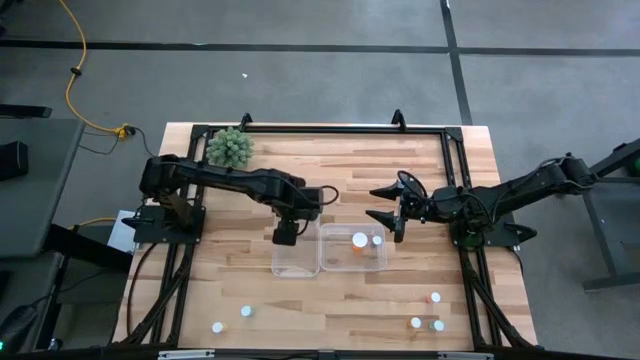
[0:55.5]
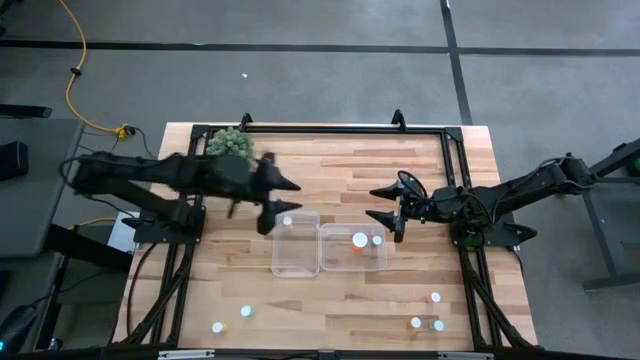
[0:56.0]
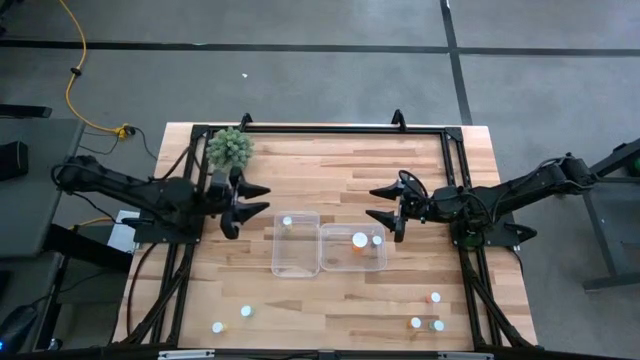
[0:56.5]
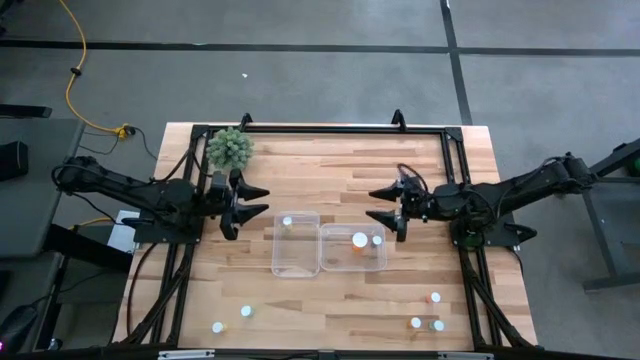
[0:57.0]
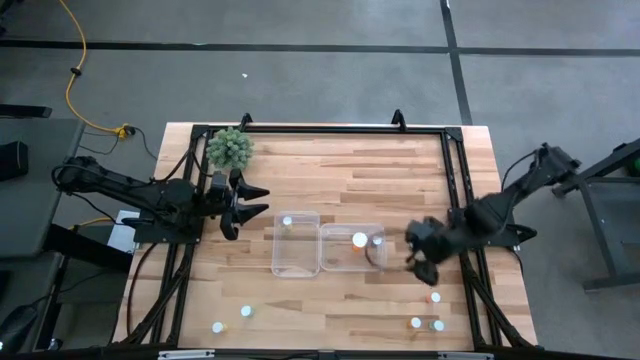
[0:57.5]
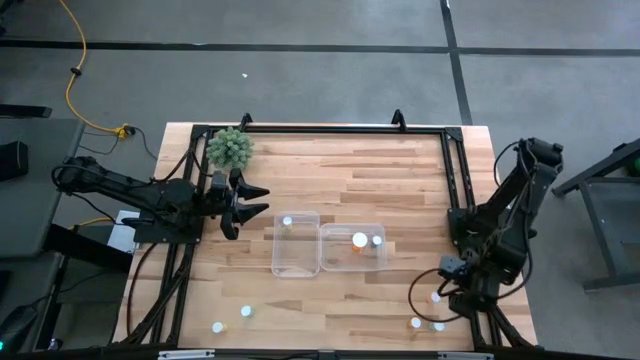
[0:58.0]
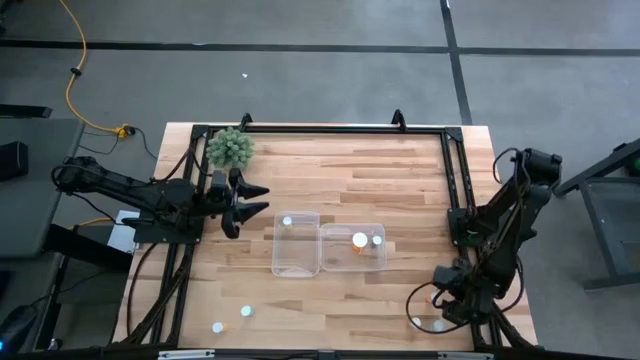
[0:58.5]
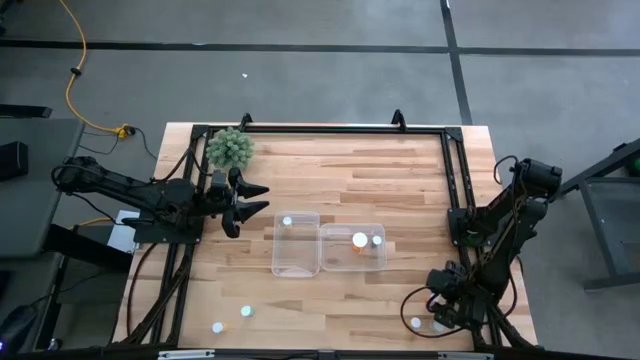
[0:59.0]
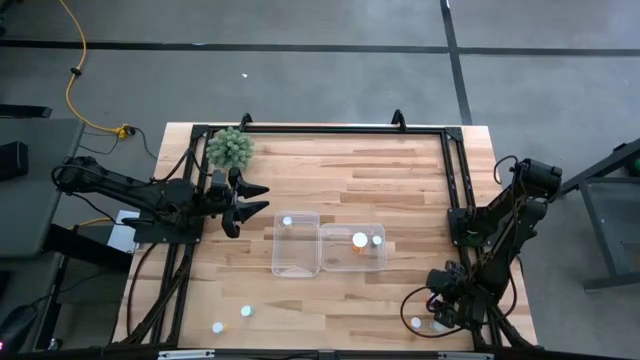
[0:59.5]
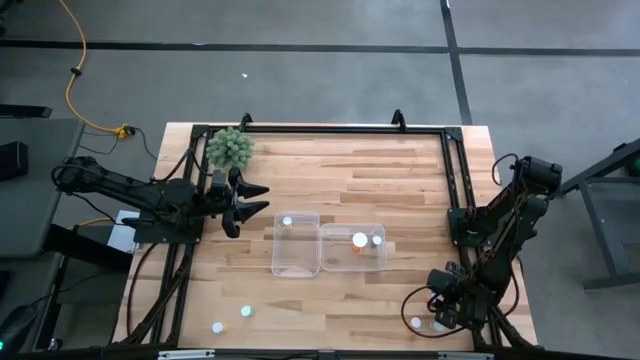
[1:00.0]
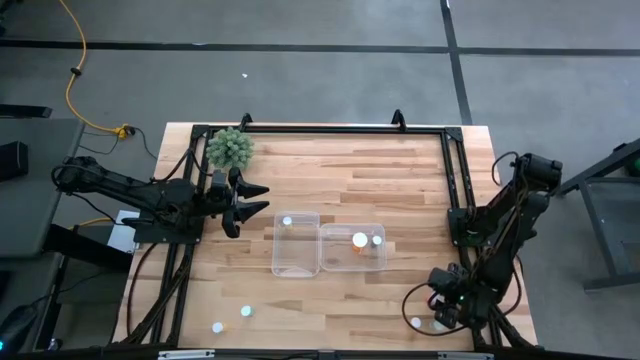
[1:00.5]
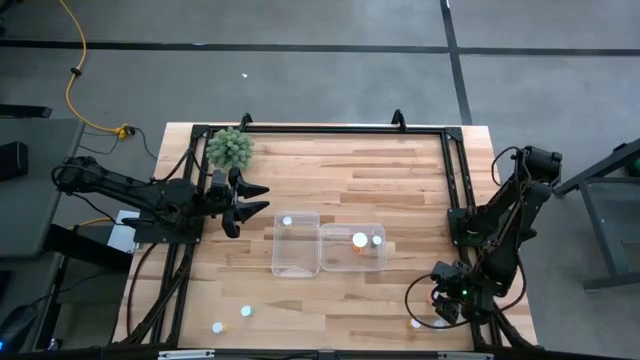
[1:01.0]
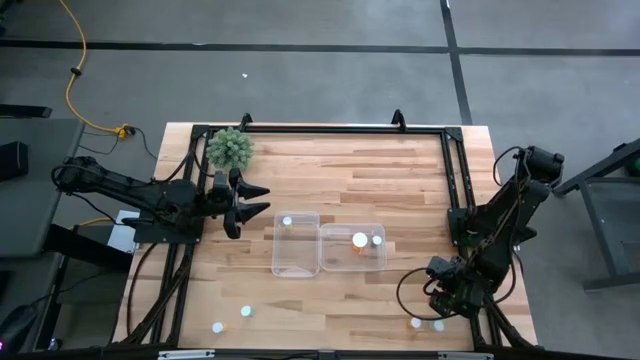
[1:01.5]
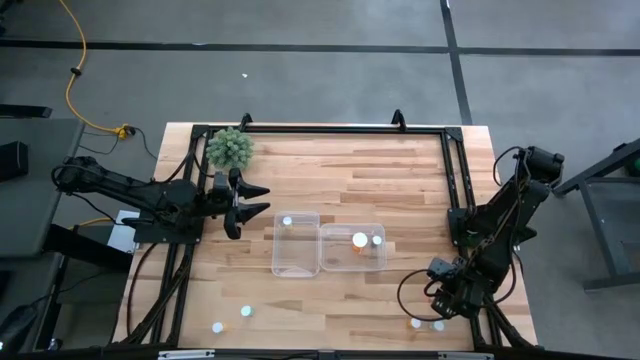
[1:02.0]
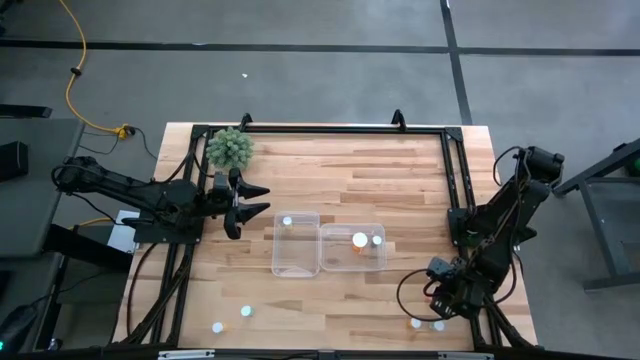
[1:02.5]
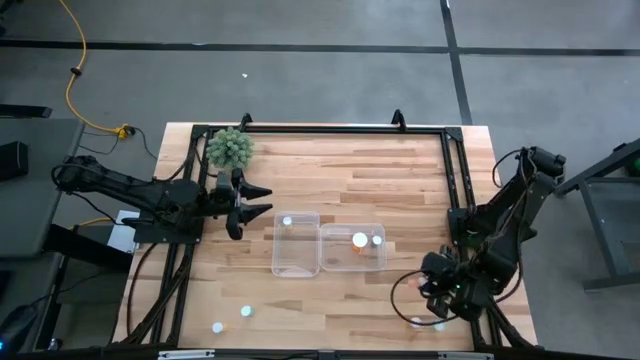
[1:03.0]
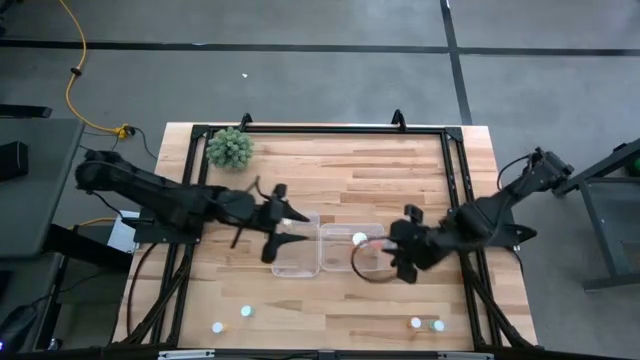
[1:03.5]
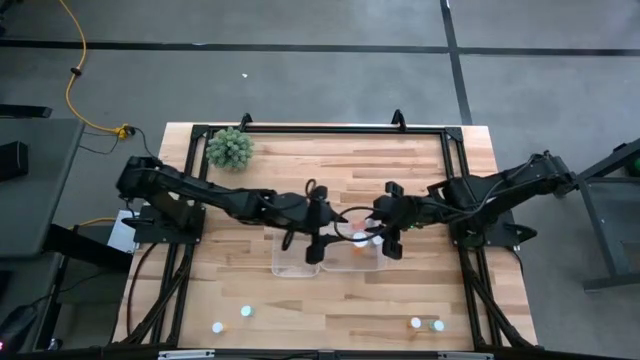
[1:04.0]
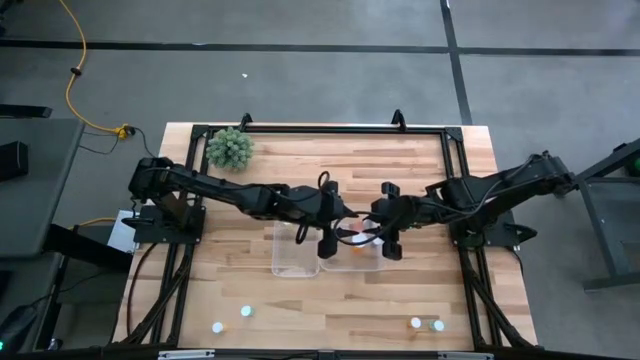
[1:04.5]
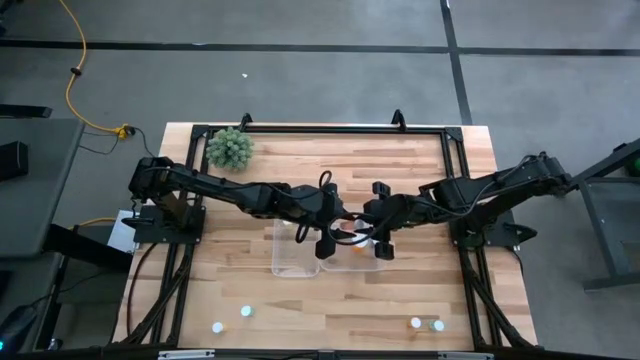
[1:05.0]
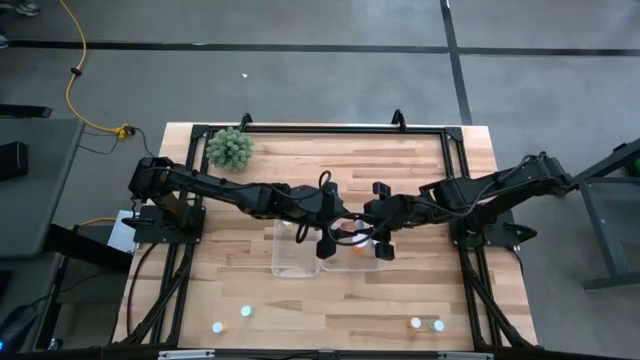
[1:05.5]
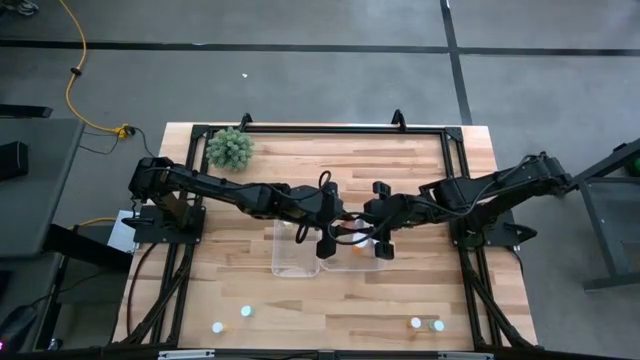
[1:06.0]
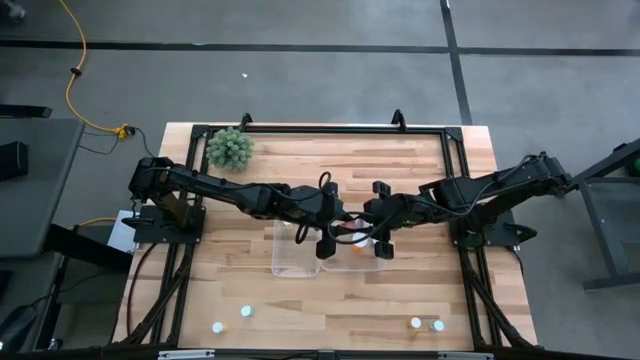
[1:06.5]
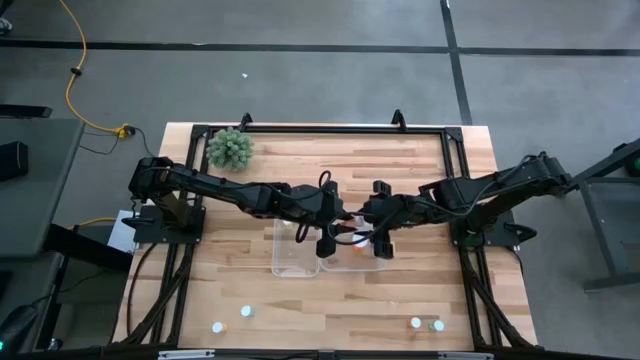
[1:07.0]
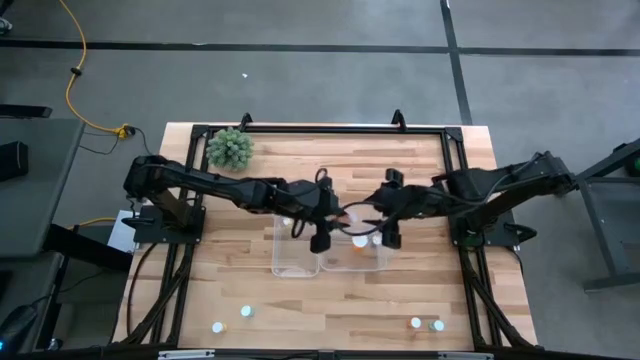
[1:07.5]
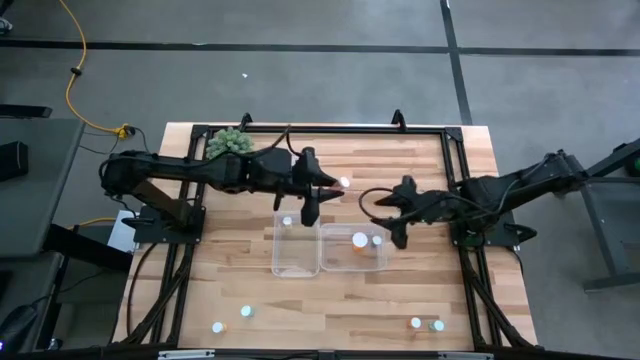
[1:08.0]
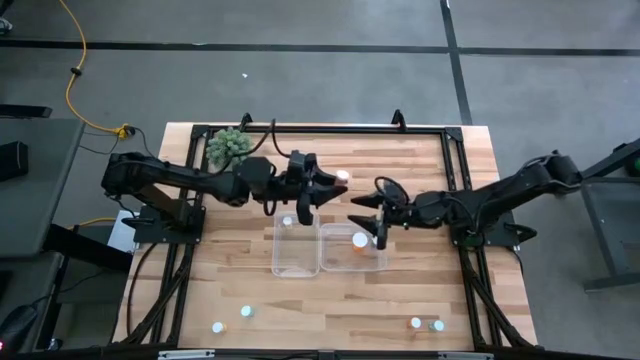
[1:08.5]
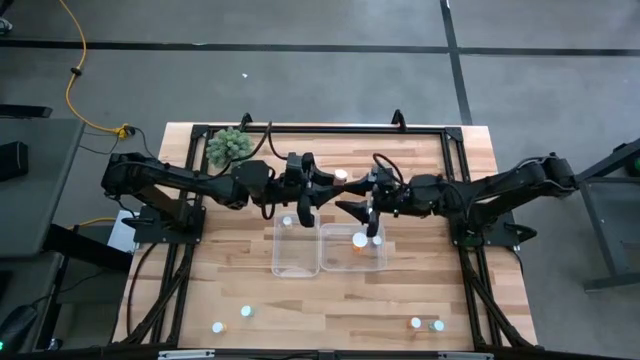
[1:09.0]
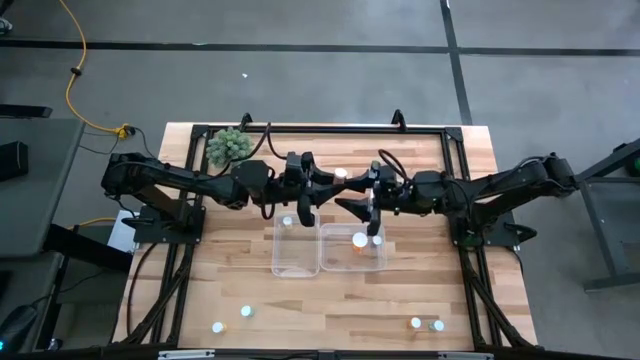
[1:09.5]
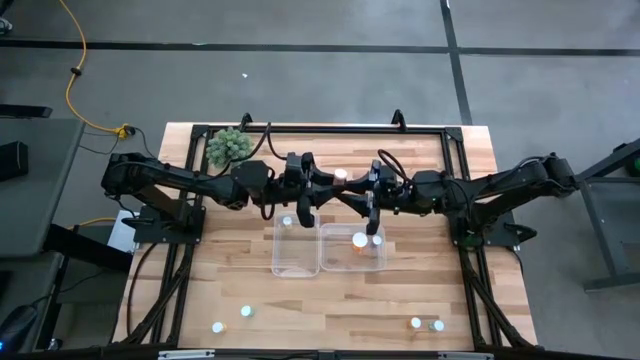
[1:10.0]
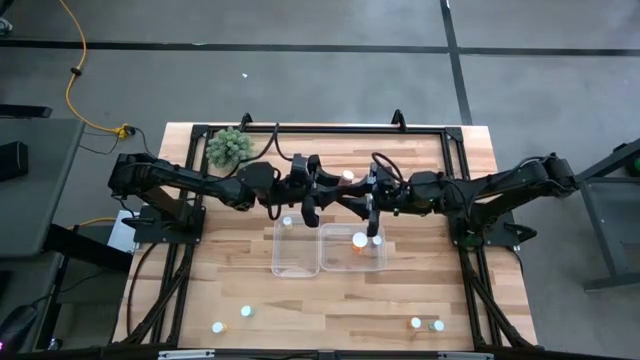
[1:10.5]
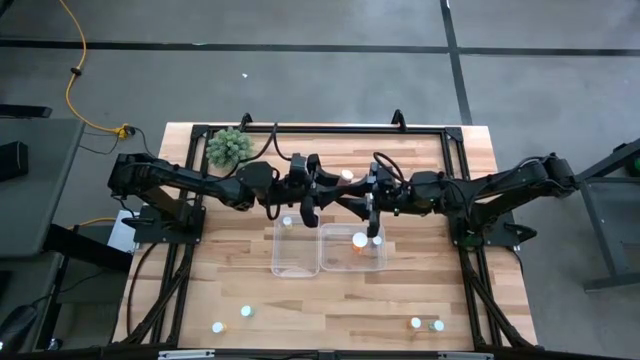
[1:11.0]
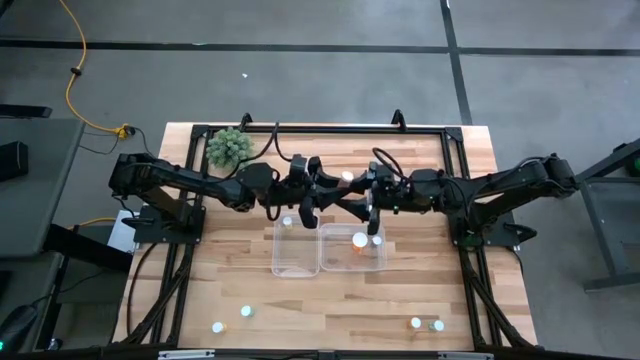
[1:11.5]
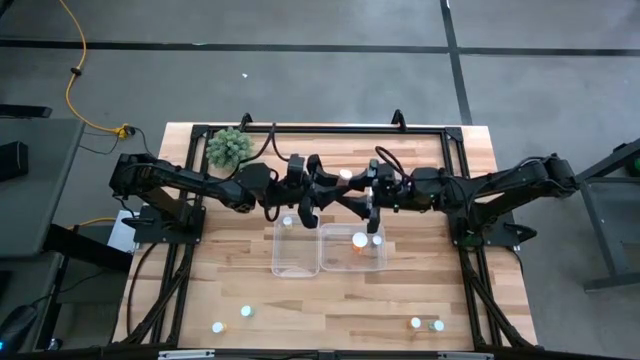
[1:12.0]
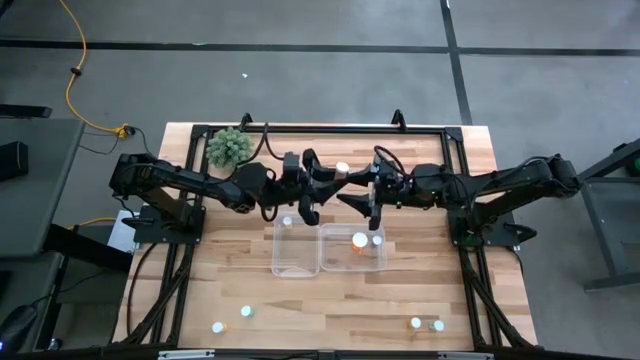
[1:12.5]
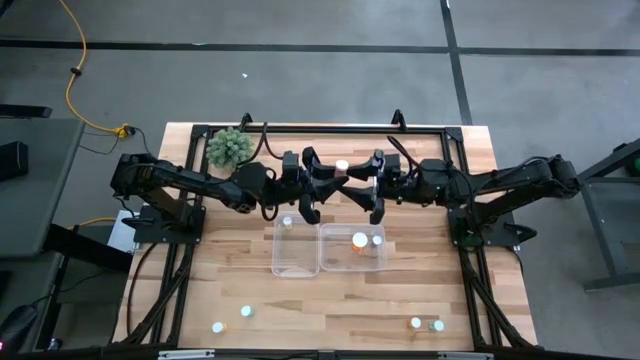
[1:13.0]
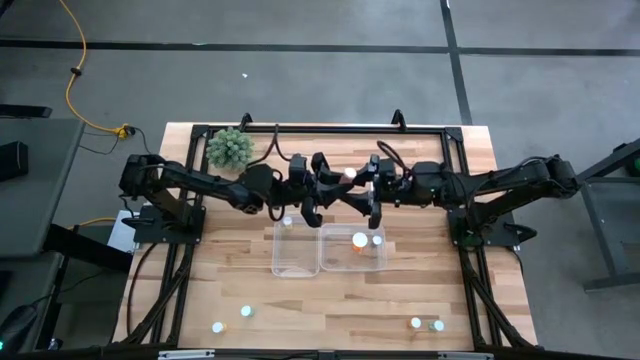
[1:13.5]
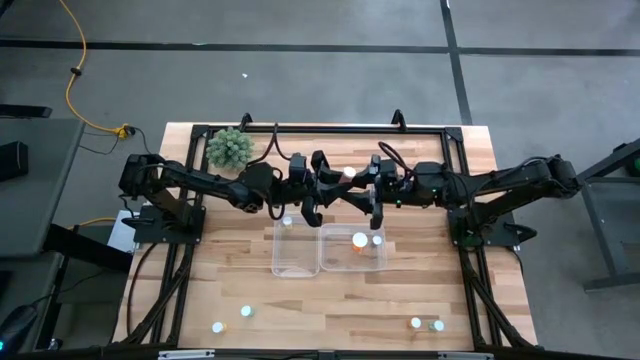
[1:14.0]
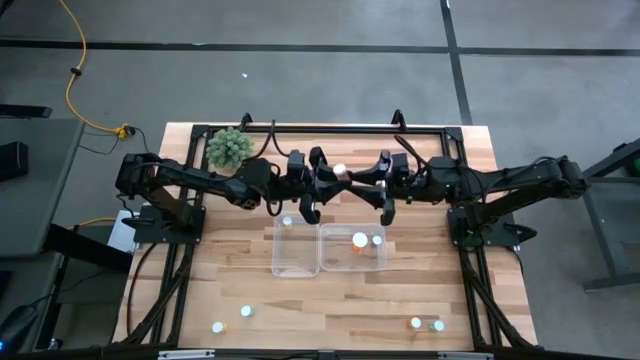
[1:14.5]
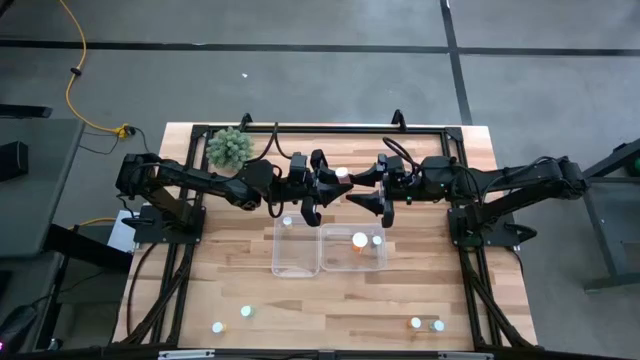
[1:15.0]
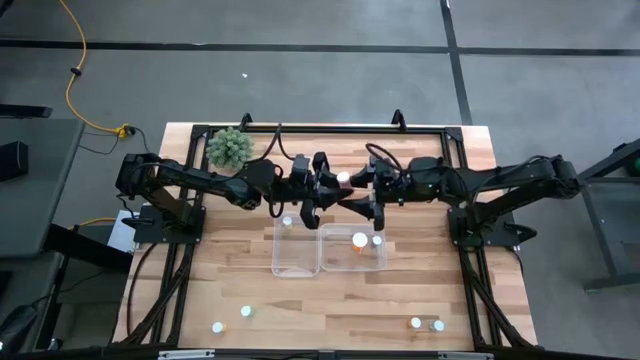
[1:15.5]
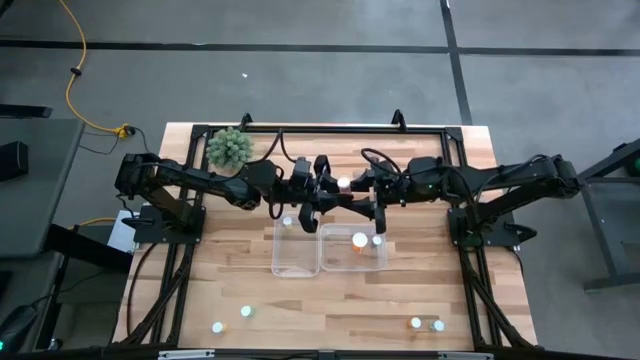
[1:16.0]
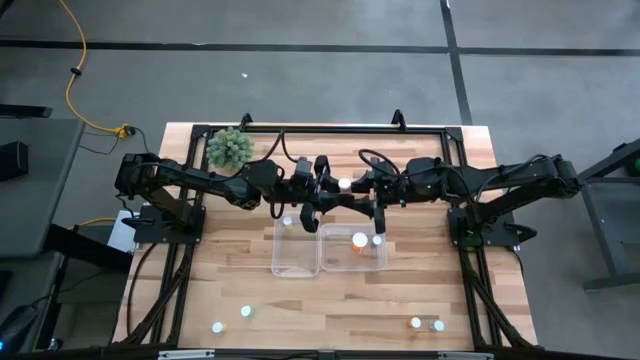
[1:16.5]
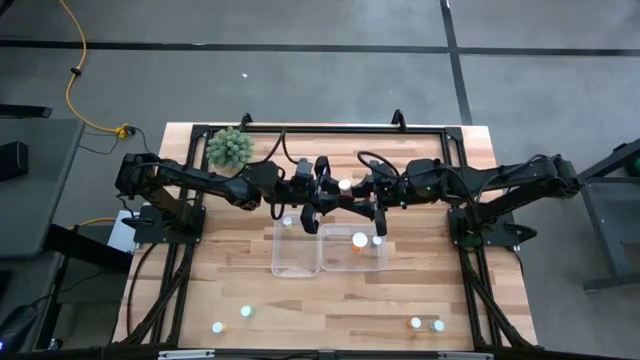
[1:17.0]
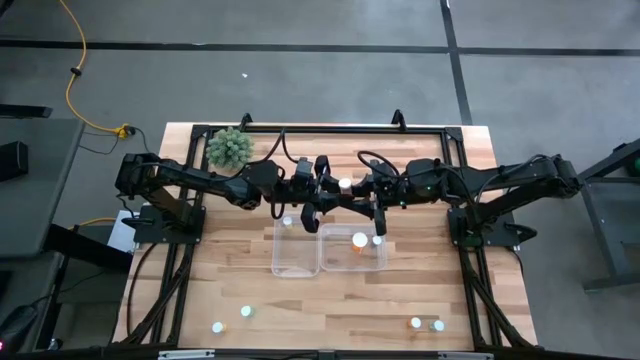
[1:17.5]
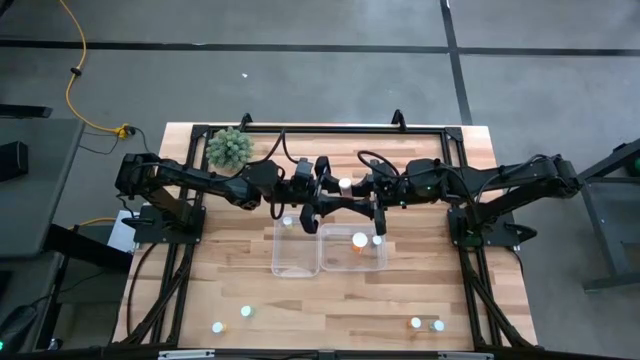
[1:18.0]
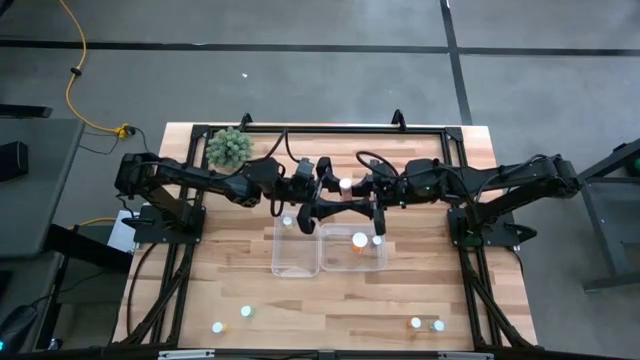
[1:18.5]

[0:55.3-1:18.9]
Task: Pick and place medicine bottles into bin by pill shape (circle, oval)
Put the red pill bottle into the left transparent bin
